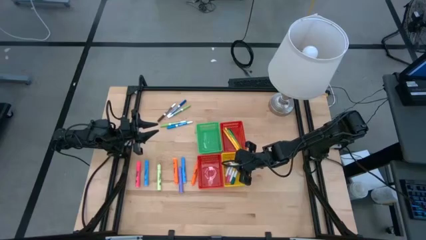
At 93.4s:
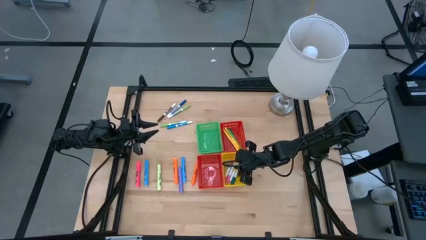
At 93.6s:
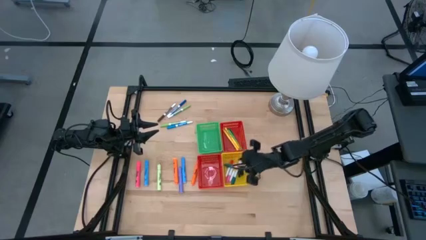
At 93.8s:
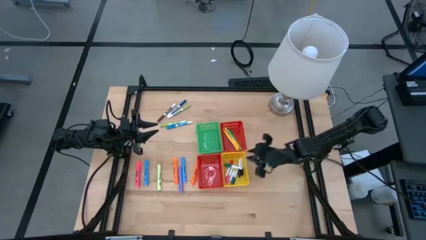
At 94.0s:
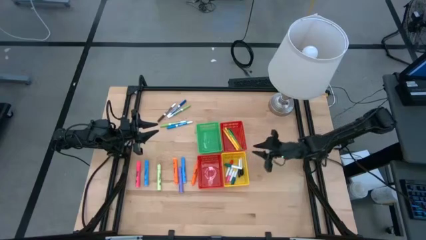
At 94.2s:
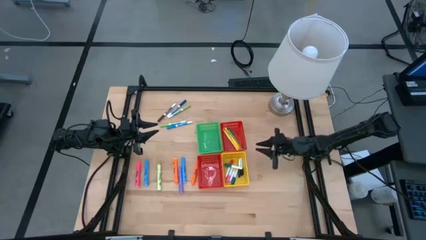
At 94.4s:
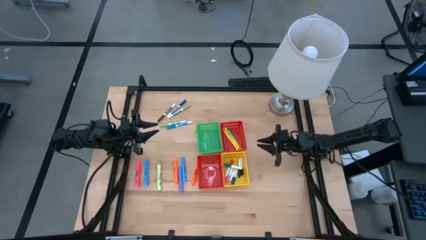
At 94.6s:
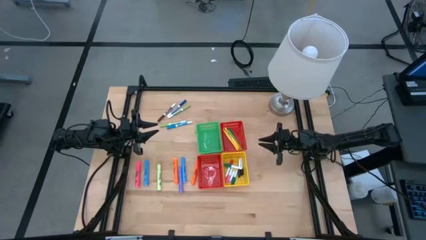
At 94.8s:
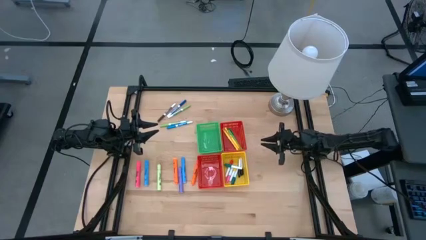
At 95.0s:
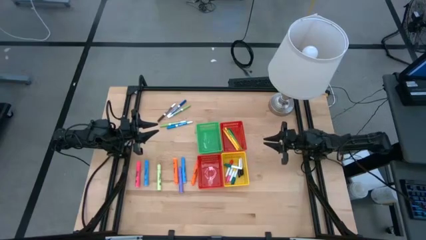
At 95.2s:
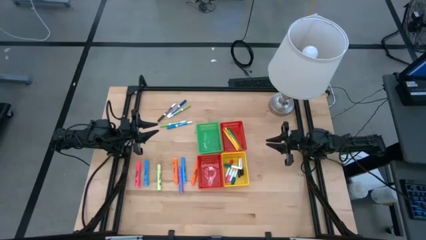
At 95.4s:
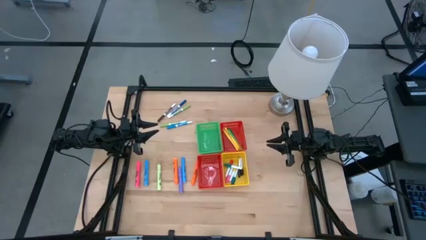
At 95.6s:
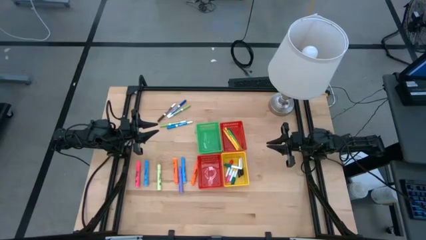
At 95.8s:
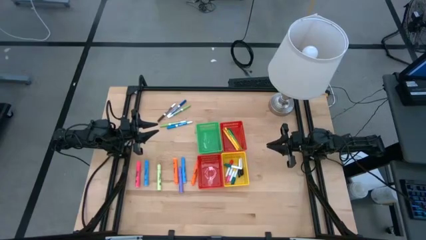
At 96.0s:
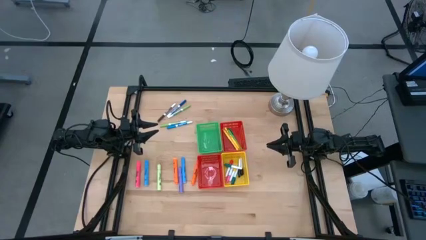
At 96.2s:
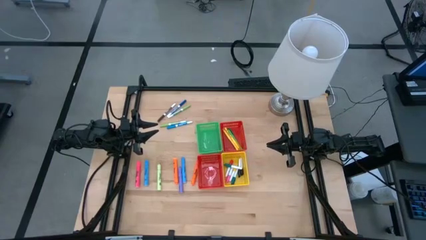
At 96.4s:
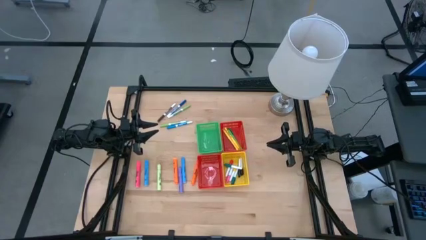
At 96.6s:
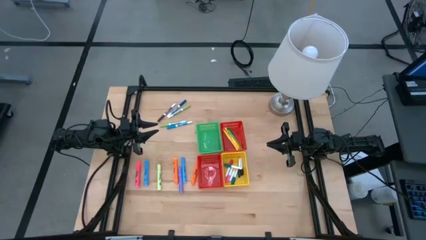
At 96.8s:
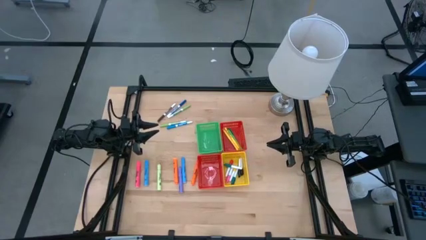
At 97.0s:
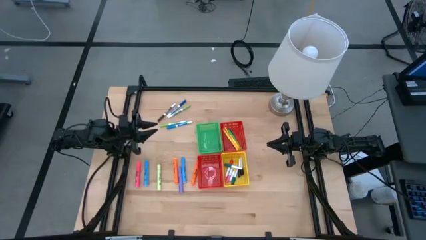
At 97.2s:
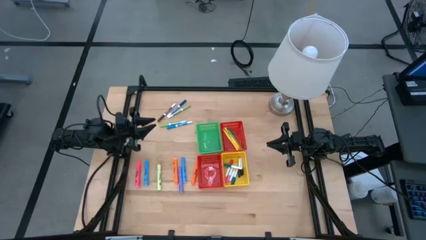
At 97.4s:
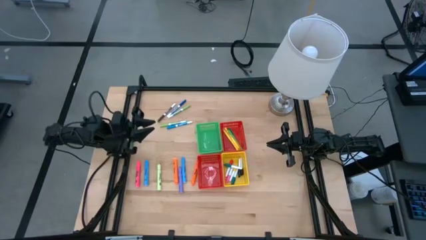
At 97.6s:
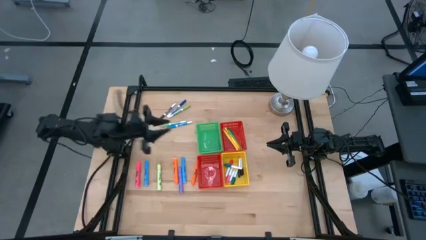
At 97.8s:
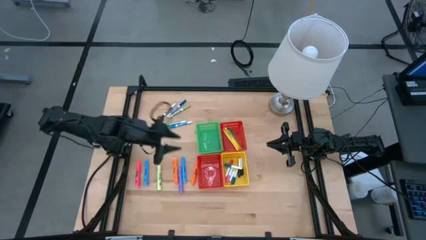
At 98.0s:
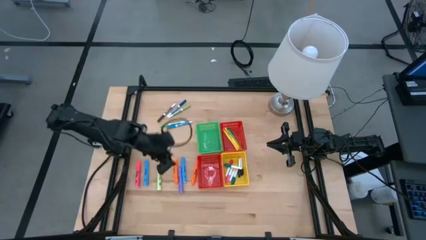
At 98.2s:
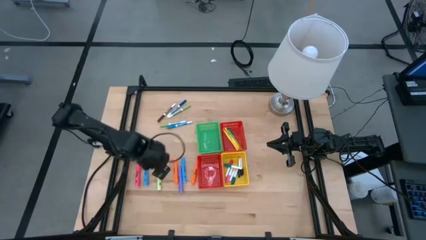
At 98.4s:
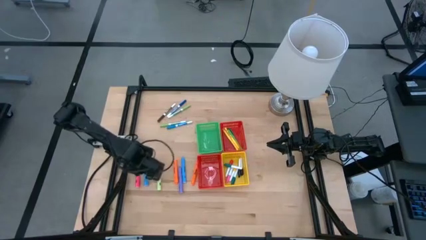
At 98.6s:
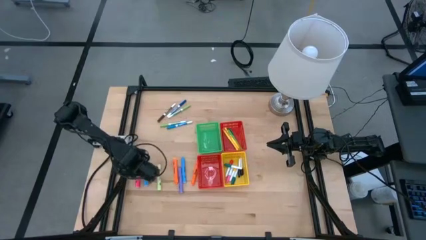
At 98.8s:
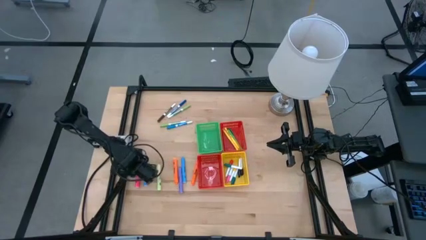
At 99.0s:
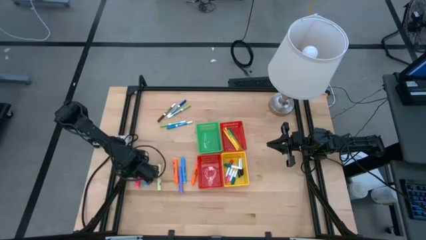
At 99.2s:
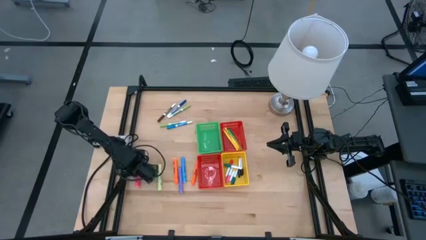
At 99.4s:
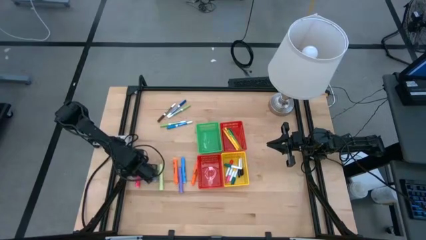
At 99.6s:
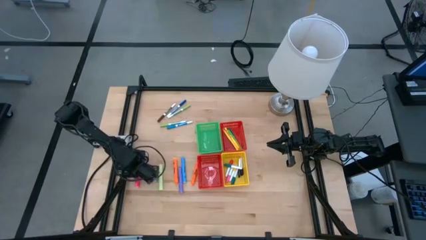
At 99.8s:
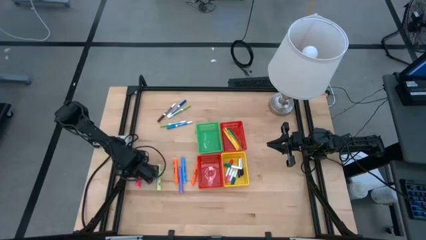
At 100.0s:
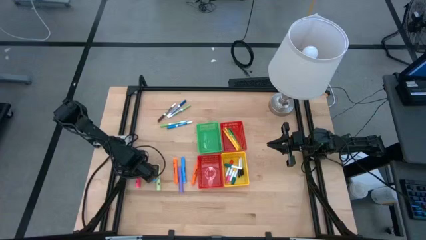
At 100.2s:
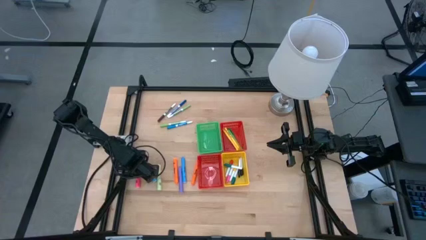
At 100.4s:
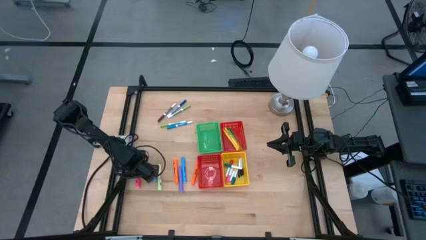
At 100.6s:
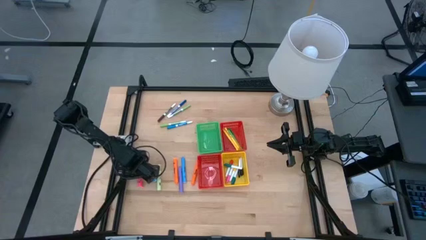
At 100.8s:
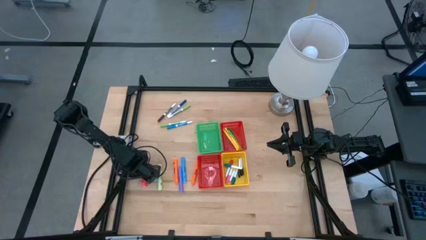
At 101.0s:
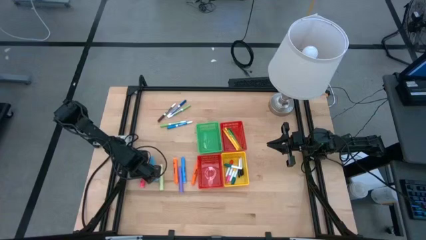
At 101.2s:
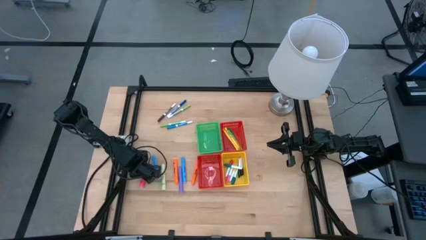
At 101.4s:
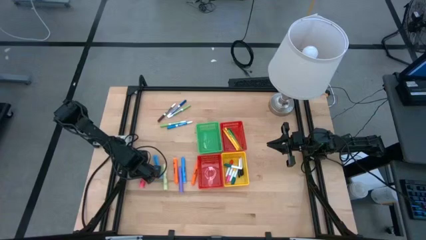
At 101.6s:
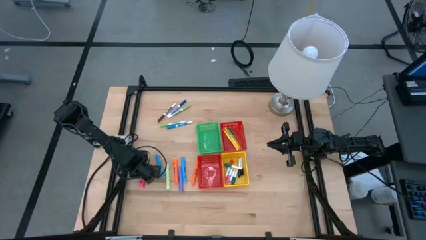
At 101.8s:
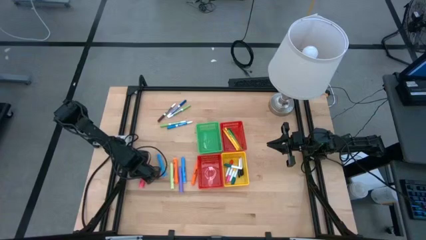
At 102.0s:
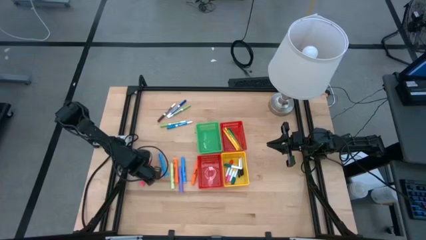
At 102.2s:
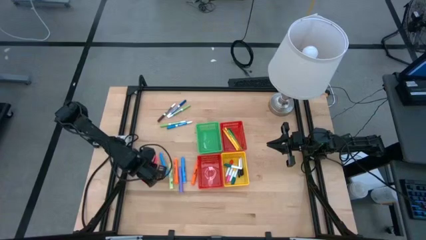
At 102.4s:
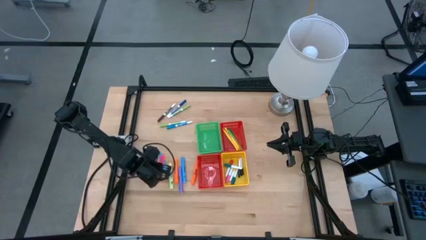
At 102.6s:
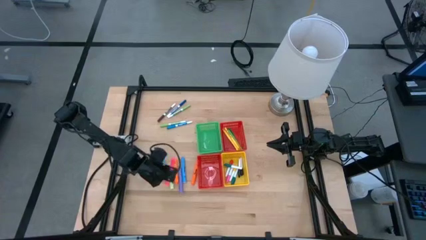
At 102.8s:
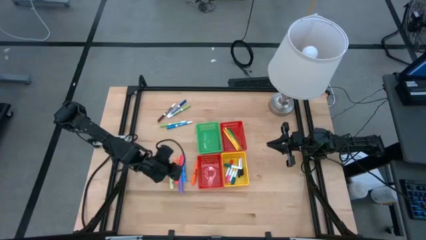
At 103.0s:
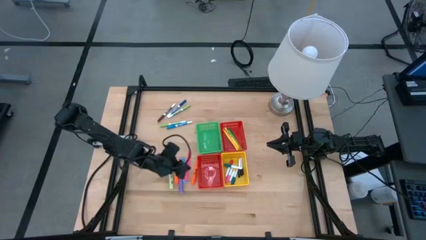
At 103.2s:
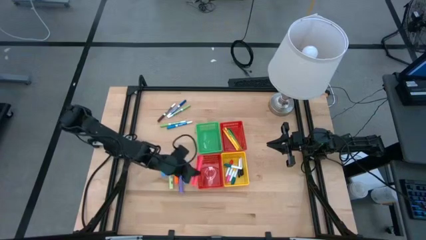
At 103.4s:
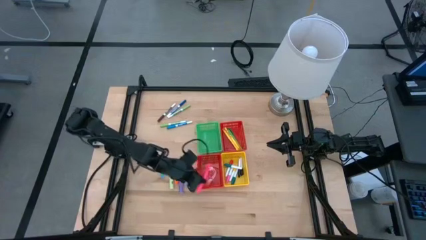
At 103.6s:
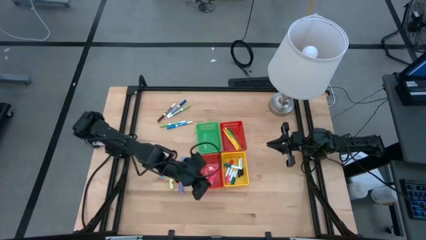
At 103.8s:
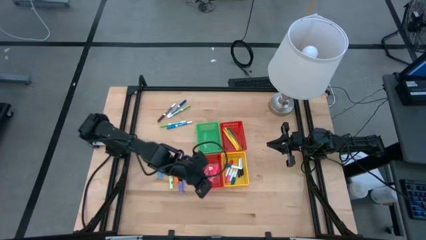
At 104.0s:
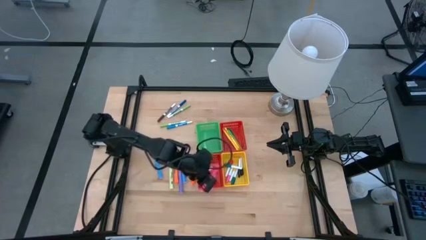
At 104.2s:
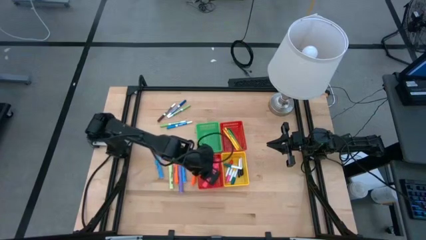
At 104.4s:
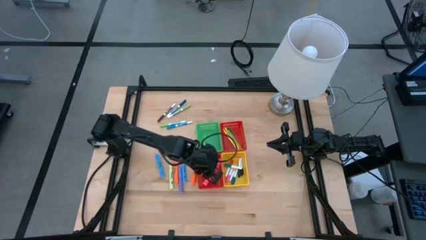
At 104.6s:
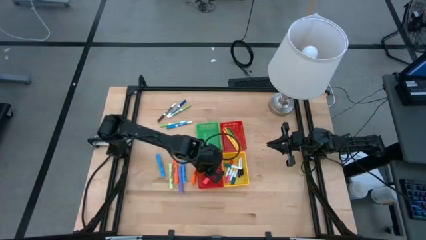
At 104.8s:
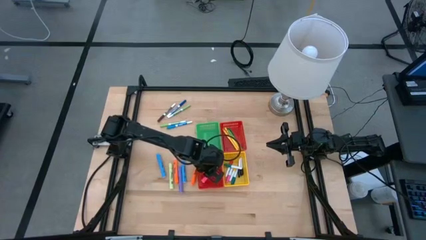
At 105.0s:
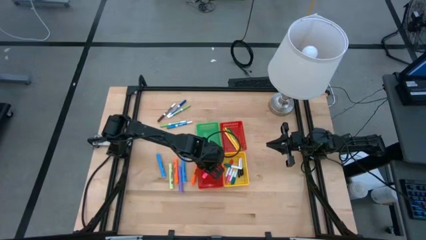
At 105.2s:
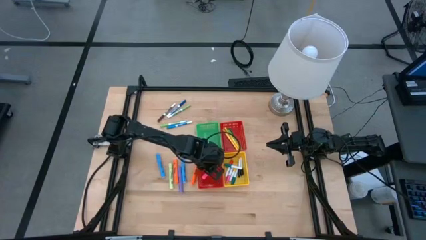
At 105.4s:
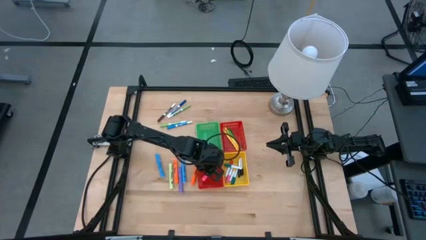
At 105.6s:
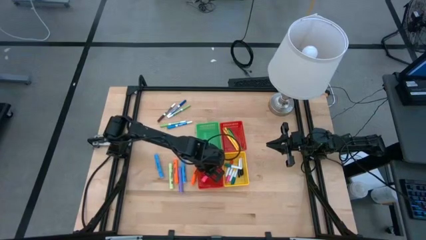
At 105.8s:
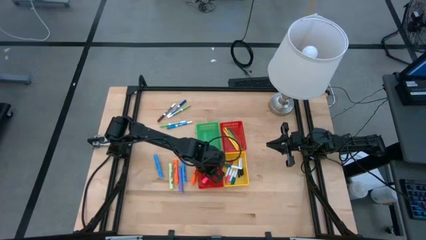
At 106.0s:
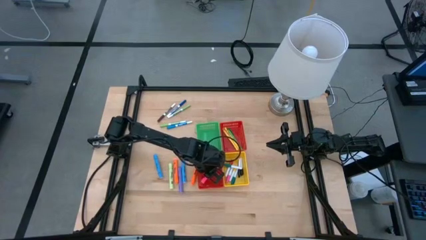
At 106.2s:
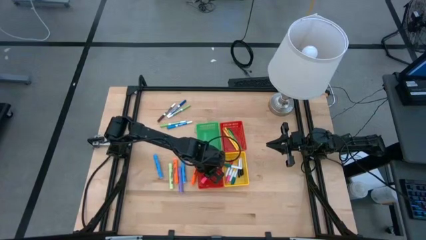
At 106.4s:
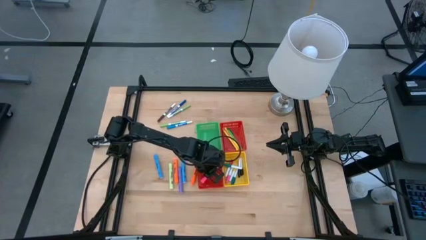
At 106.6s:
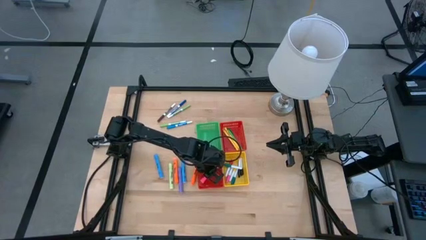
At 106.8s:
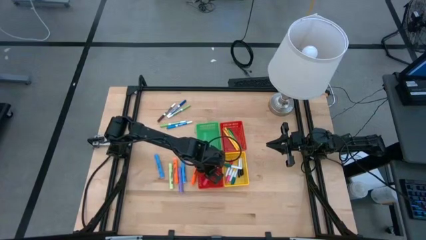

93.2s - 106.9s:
Task: Pick & Place Markers
Put the large pink highlighter into the bottom red bin
